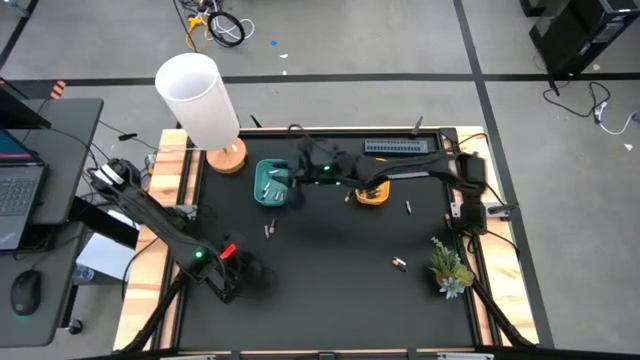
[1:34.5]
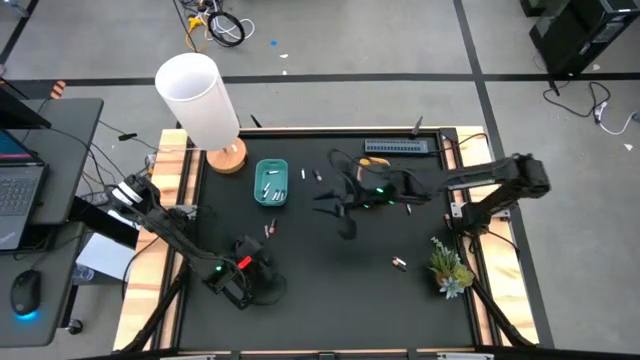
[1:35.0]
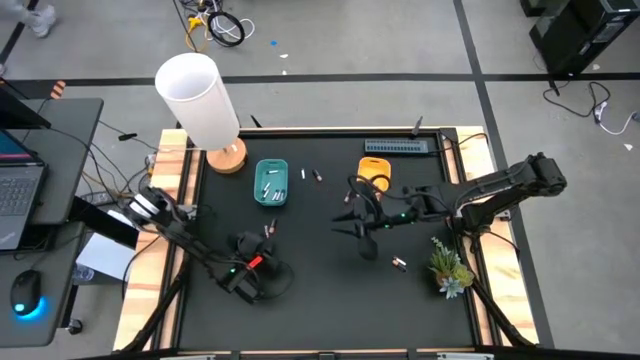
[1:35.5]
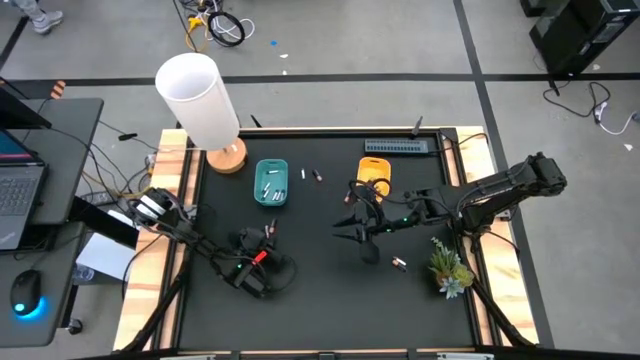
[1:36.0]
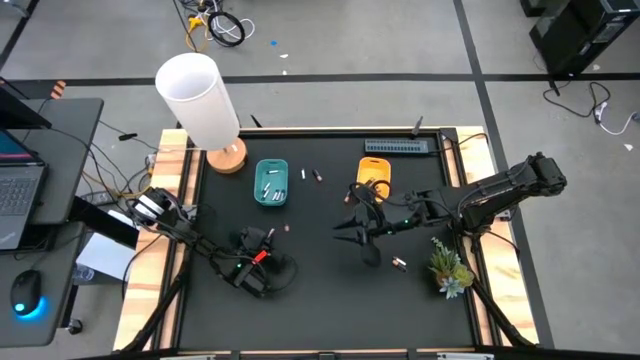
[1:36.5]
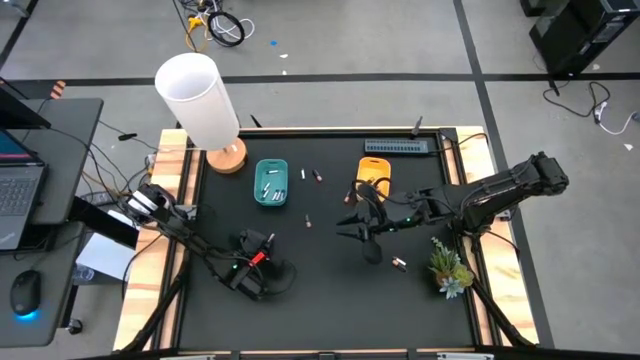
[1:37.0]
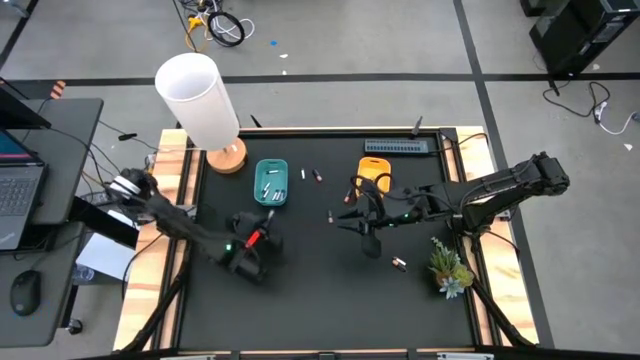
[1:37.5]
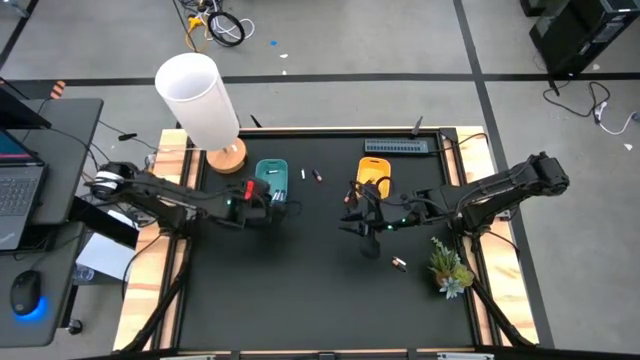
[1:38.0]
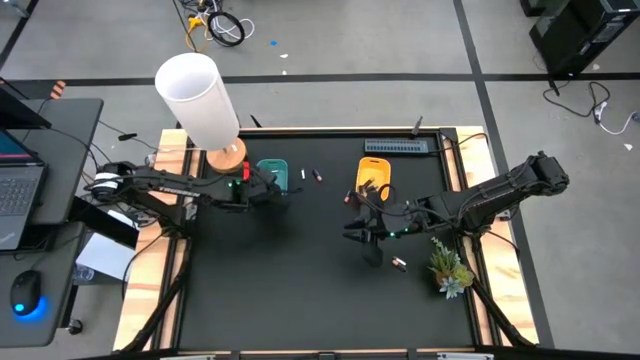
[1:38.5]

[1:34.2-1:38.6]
Task: Sort batteries
Put the silver battery into the blue bin

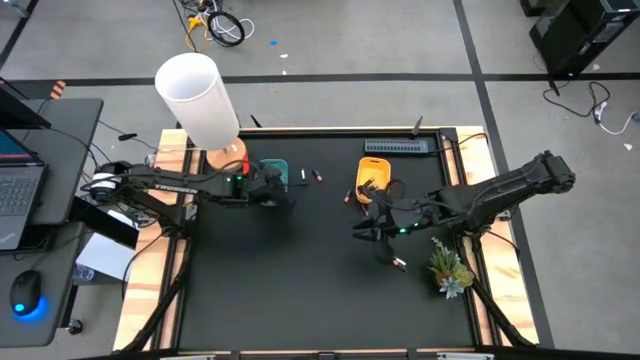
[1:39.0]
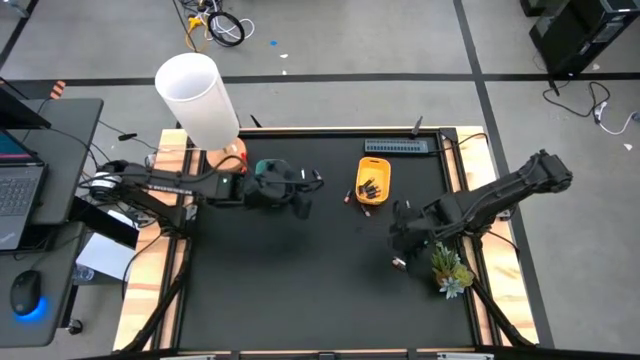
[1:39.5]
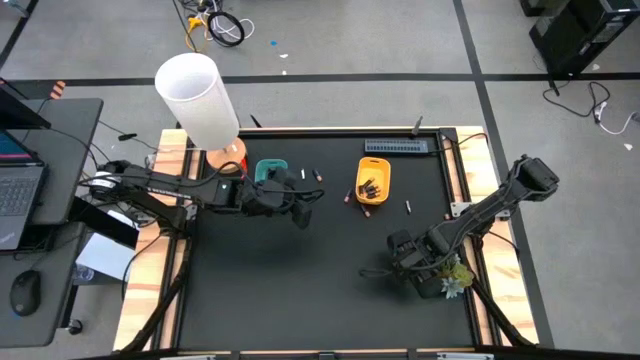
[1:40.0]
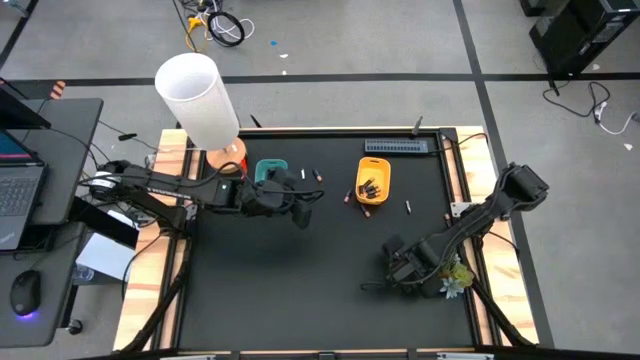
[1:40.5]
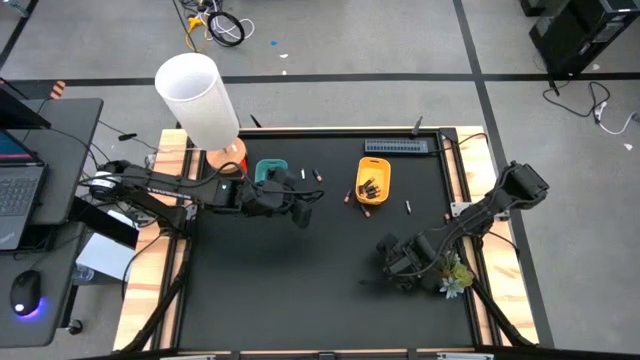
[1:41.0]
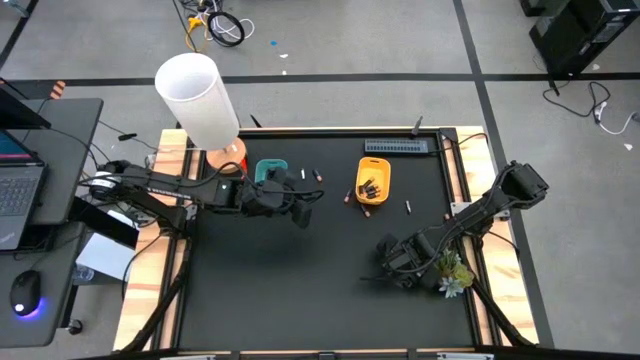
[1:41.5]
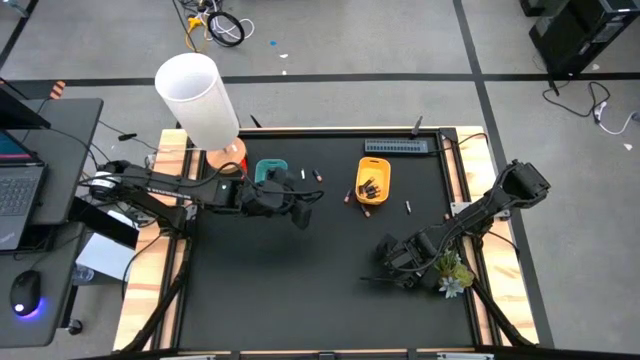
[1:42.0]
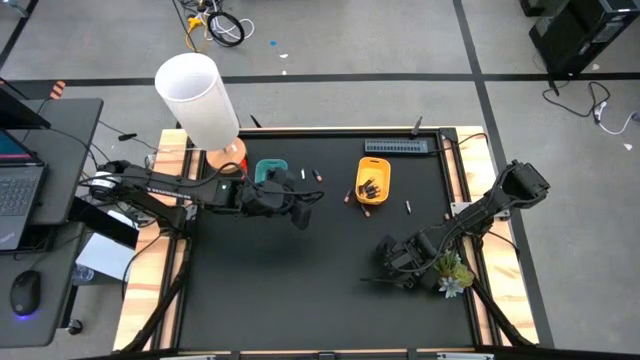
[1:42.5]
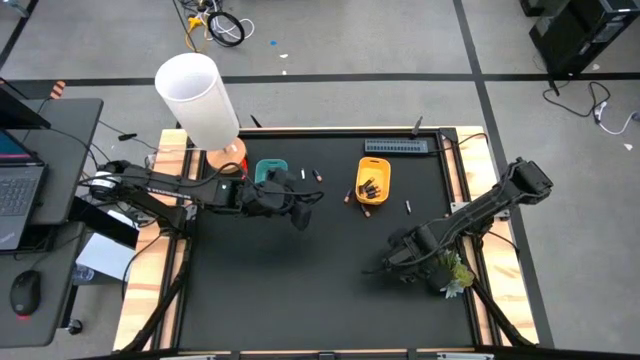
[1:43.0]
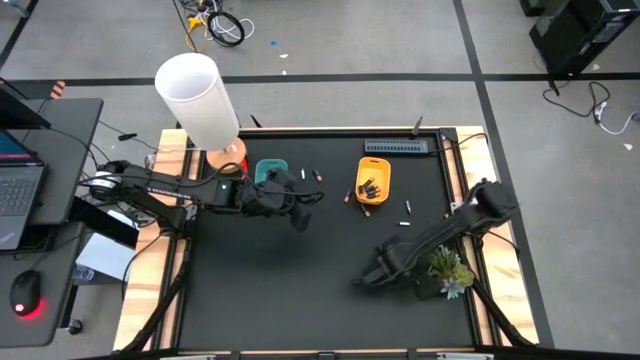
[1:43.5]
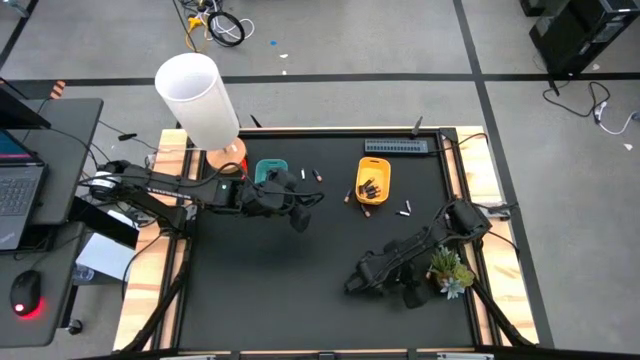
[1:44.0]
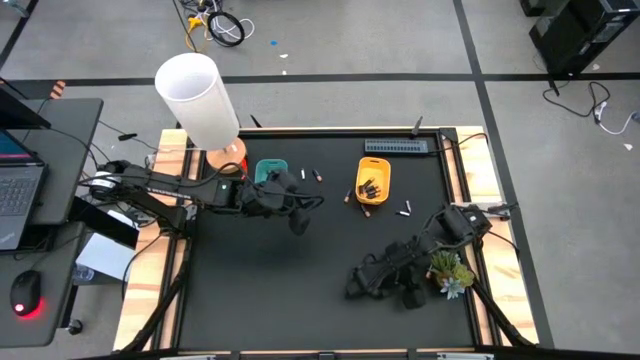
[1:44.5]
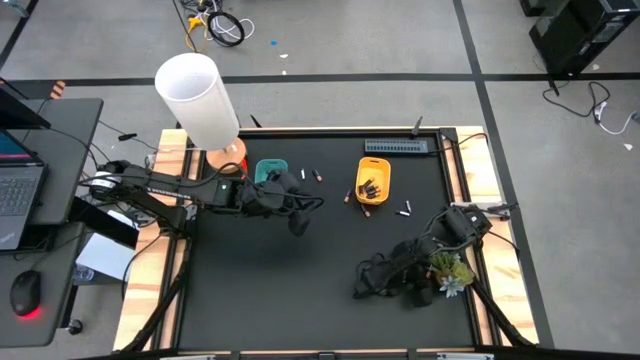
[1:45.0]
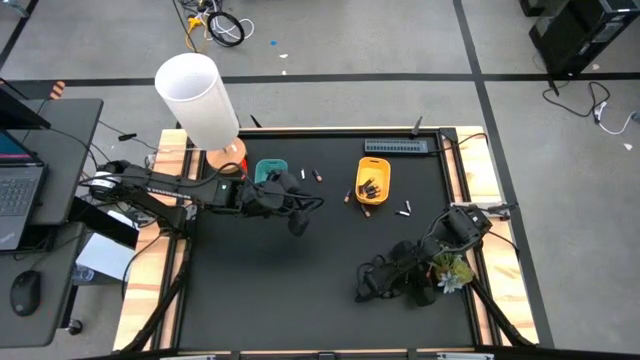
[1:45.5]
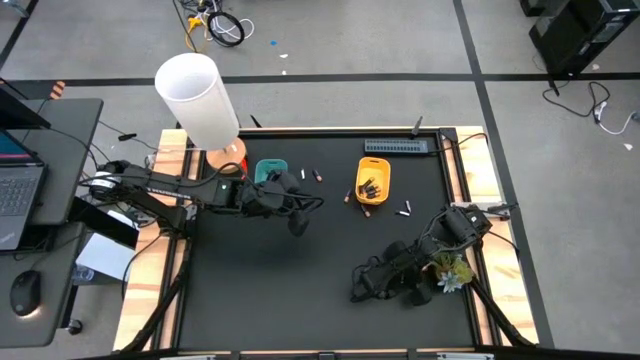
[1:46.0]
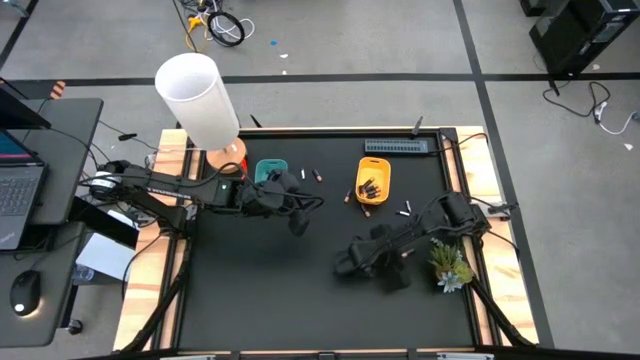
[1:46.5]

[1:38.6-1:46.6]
Put the black battery into the yellow bin

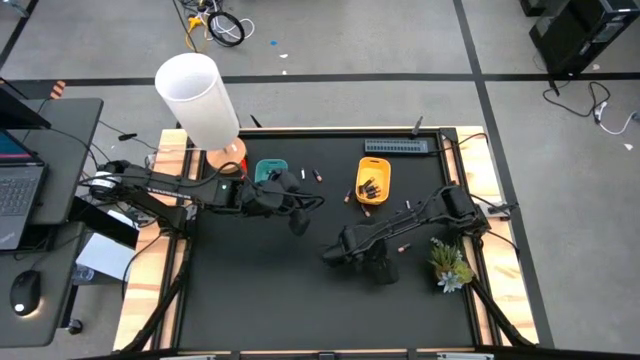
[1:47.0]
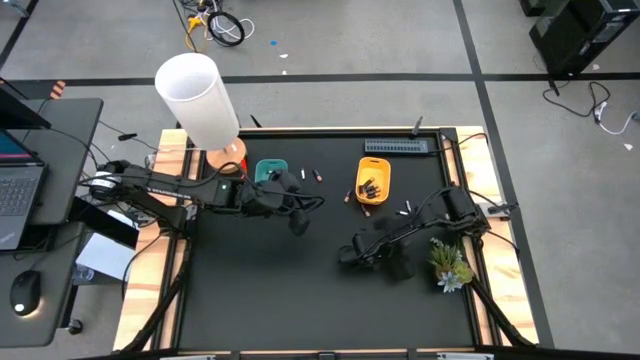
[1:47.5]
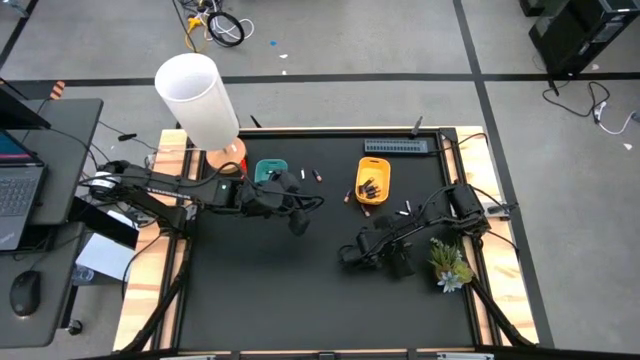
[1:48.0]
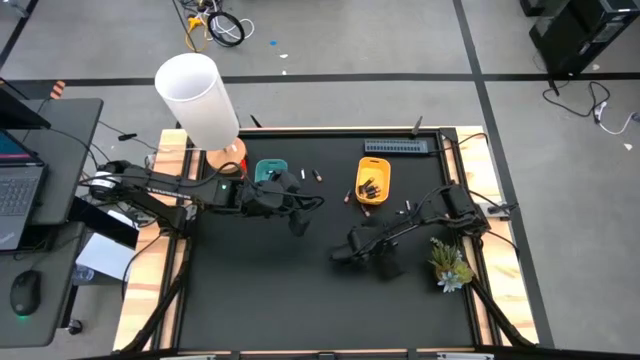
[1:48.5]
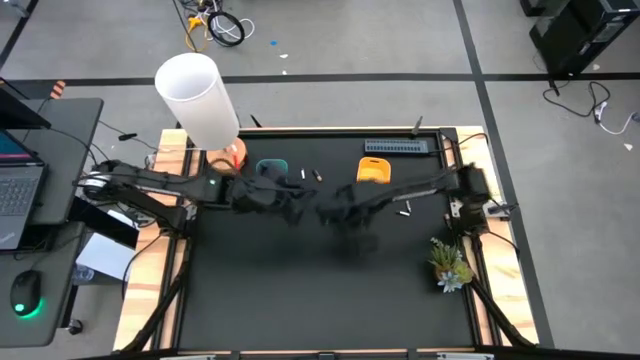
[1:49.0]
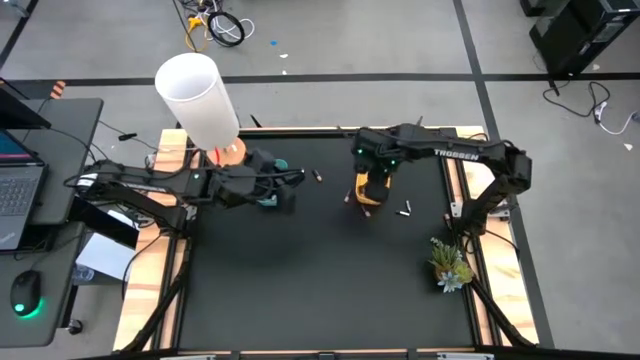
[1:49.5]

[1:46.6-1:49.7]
Put the black battery into the yellow bin

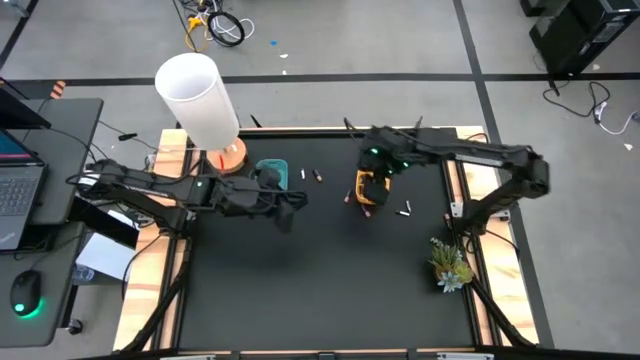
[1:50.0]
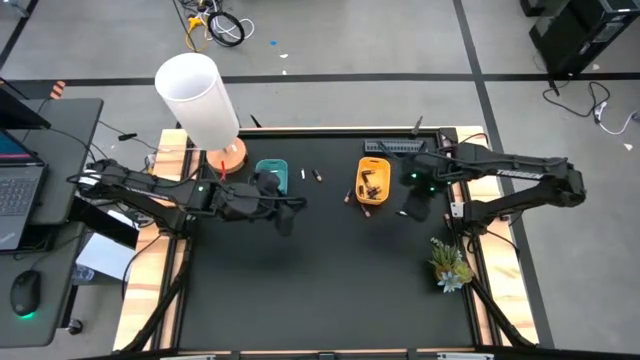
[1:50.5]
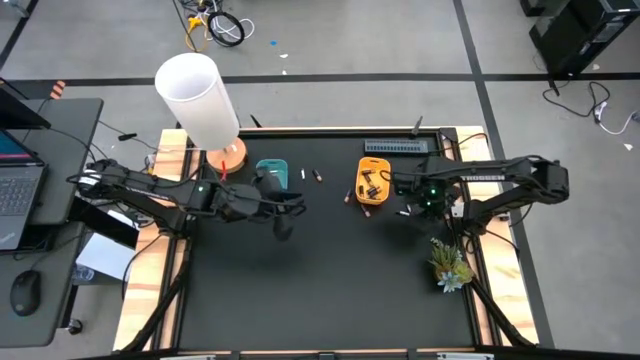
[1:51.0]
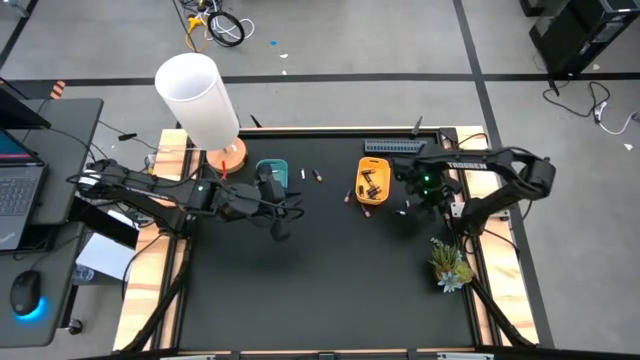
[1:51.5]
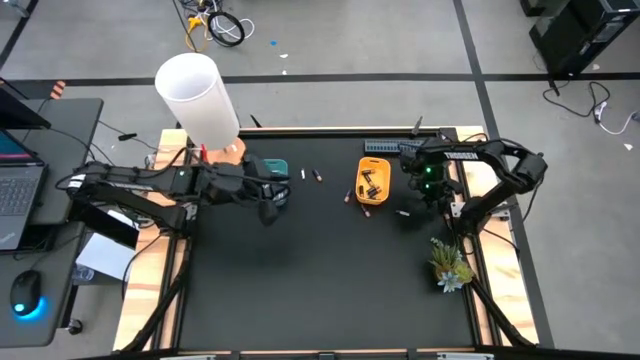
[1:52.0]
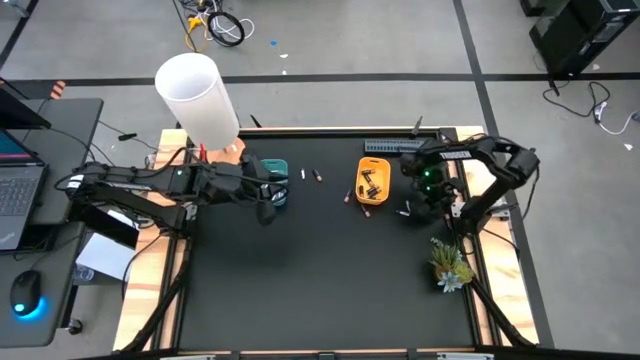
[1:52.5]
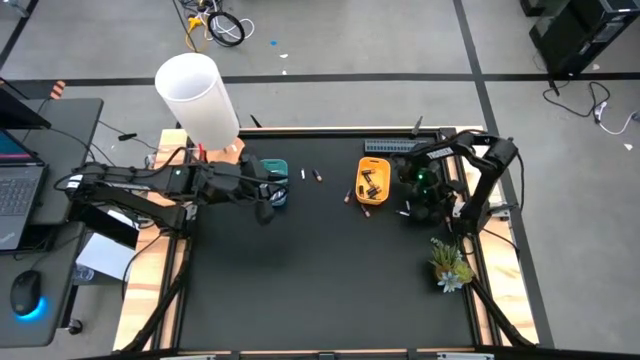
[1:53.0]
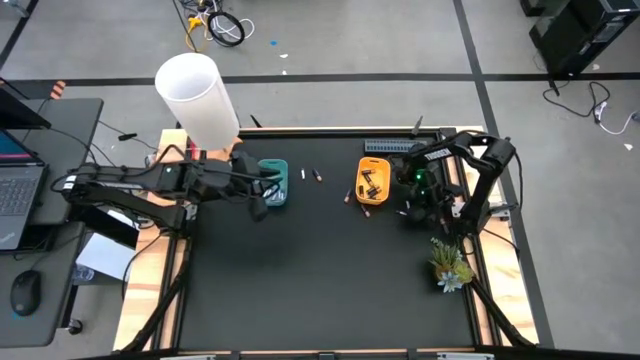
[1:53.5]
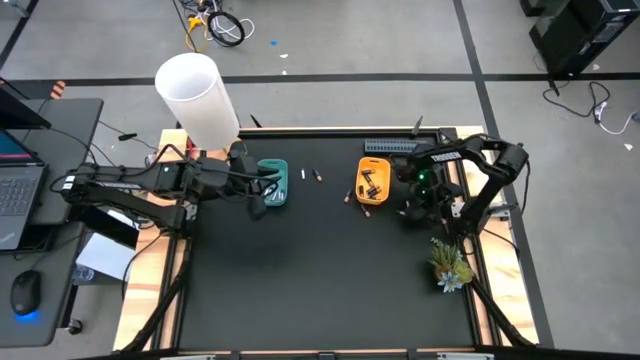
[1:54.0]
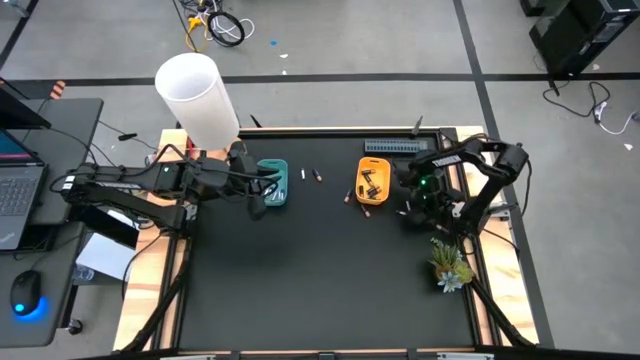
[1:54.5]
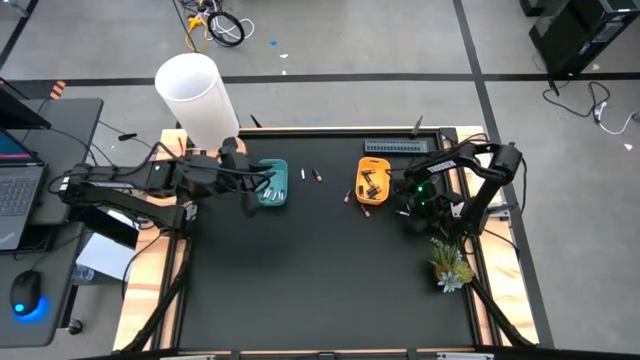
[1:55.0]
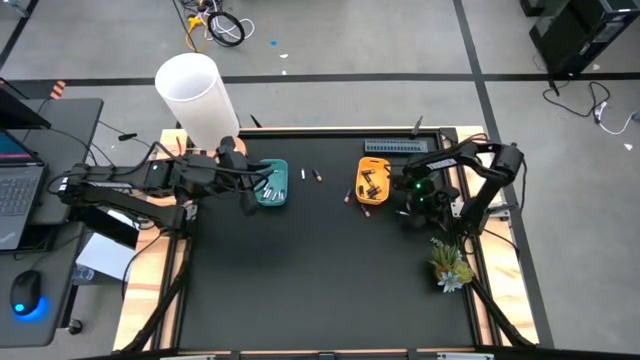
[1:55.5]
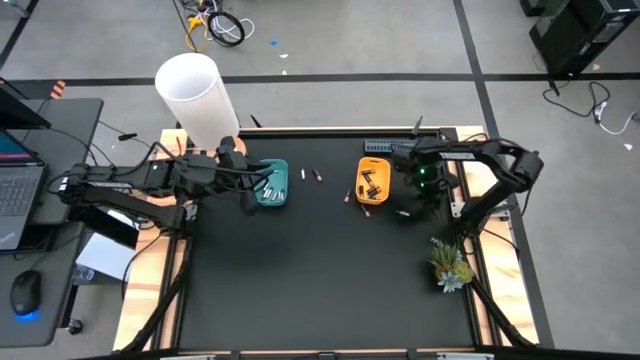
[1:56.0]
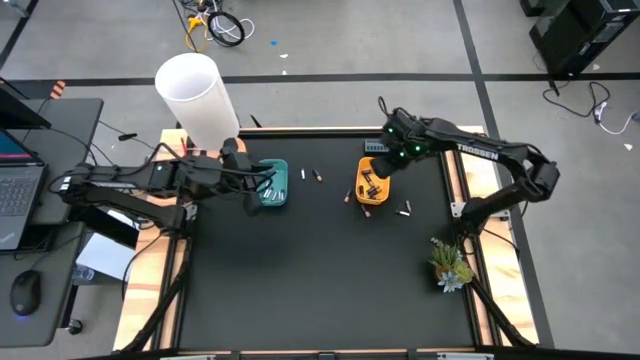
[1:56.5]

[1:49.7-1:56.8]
Put the black battery into the yellow bin
